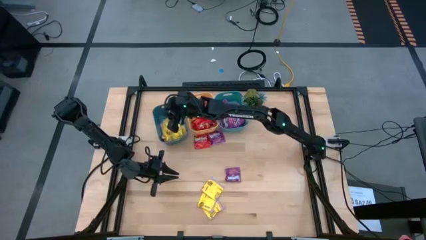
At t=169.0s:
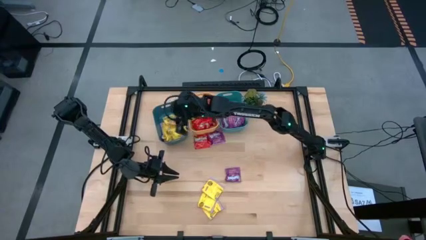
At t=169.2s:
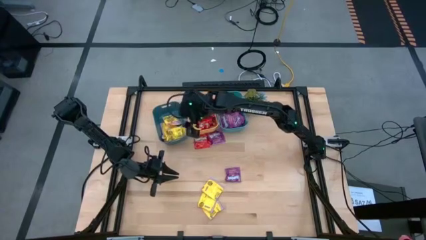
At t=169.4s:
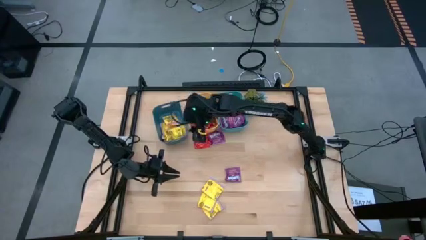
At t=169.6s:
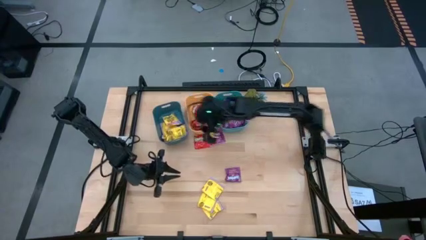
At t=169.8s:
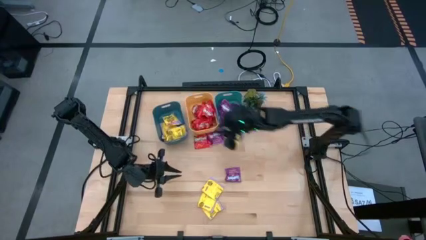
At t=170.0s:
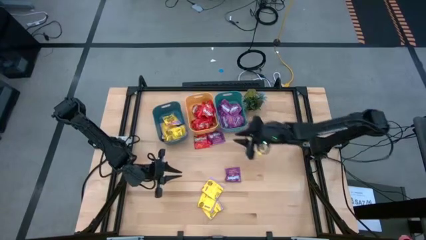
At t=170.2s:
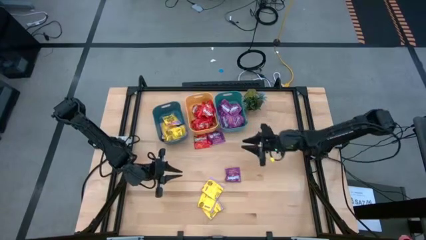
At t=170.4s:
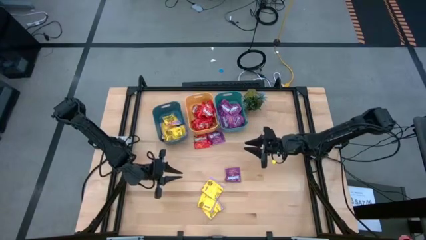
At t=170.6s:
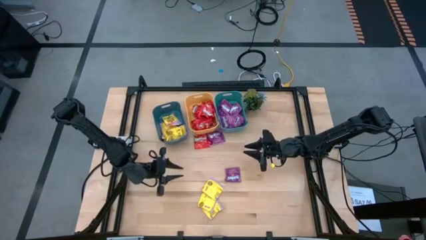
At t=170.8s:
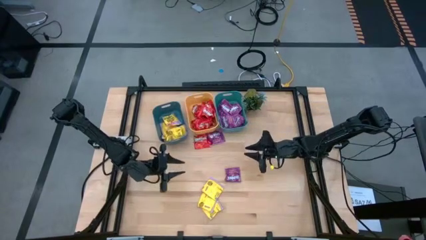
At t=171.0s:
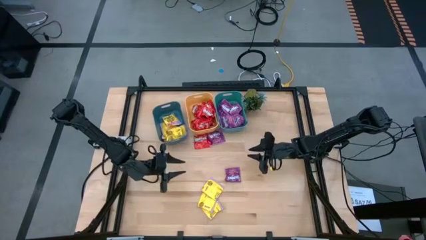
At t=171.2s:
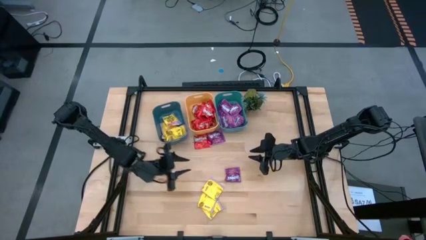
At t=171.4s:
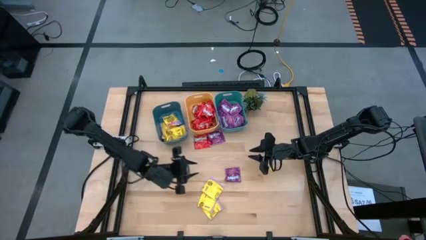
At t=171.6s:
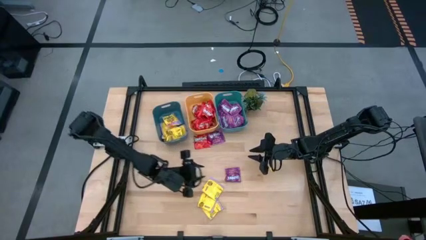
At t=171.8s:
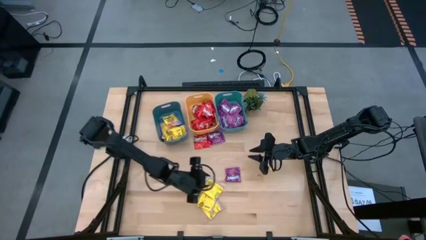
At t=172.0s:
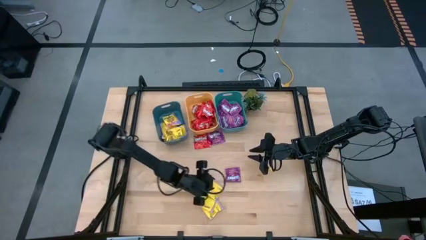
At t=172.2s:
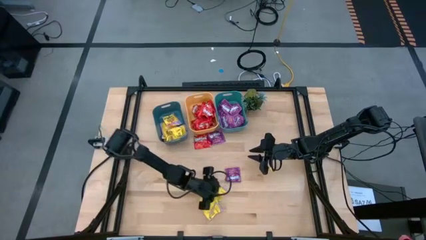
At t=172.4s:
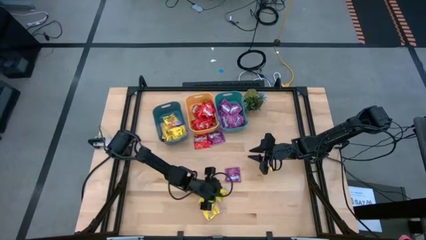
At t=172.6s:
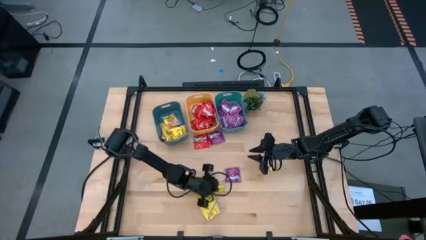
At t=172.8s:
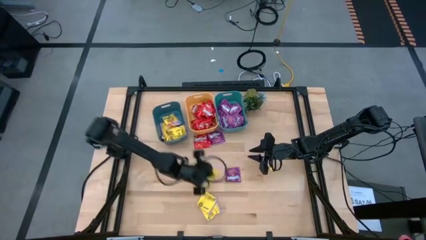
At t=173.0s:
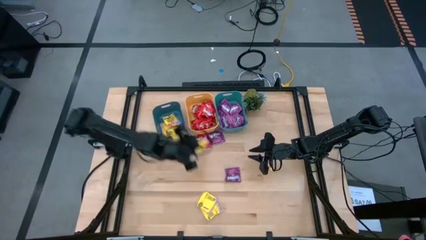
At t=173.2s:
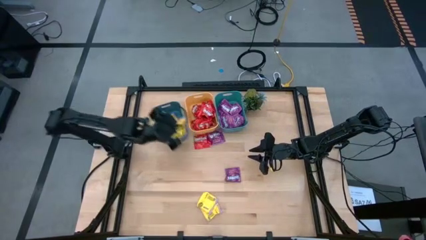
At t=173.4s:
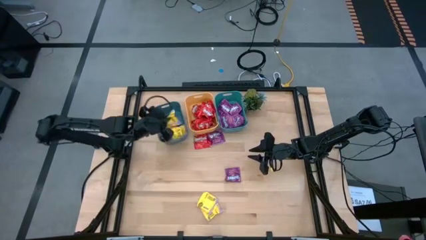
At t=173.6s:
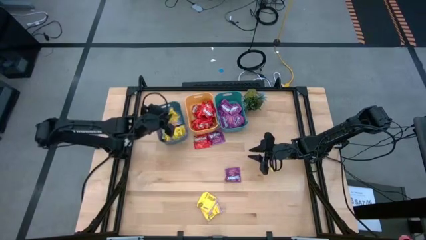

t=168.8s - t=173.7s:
Task: Sort candy
Put the yellow candy into the blue bin

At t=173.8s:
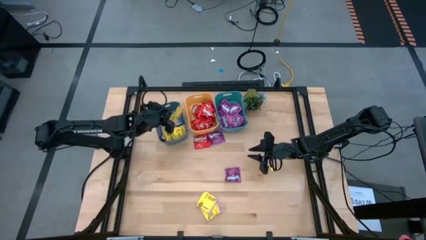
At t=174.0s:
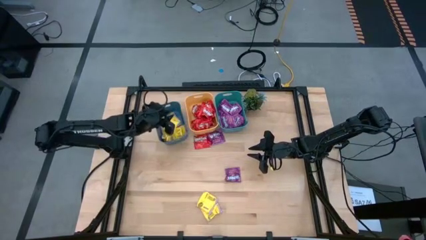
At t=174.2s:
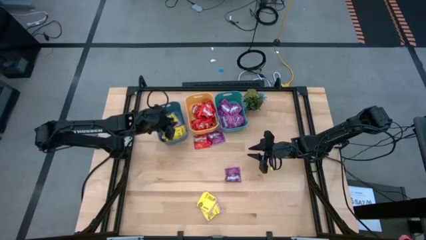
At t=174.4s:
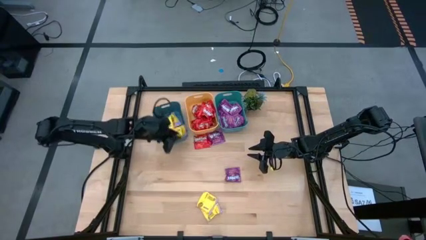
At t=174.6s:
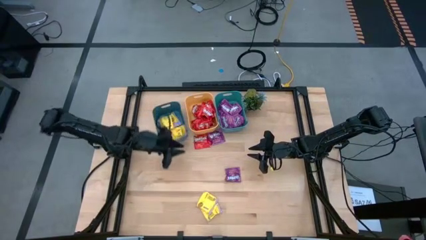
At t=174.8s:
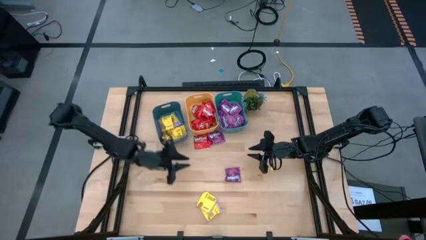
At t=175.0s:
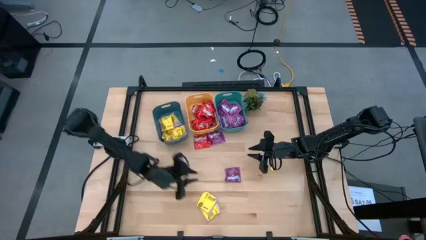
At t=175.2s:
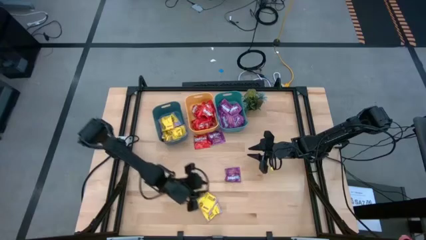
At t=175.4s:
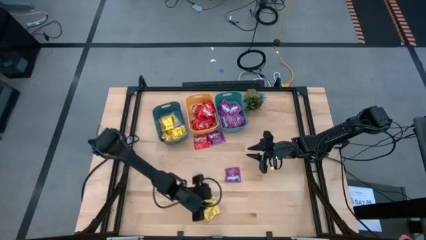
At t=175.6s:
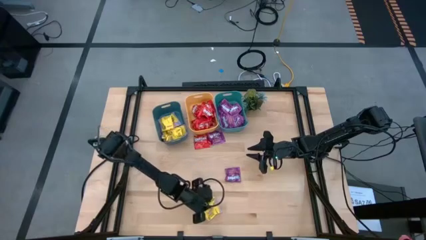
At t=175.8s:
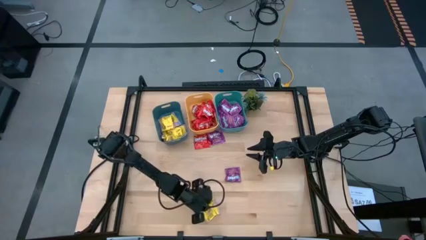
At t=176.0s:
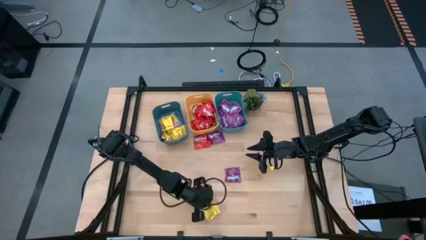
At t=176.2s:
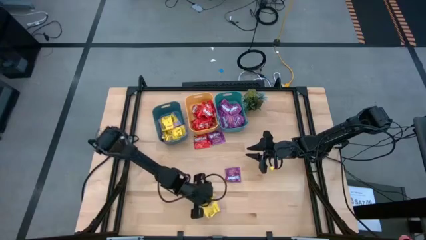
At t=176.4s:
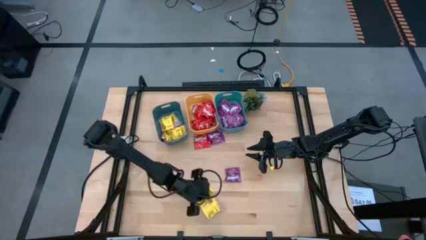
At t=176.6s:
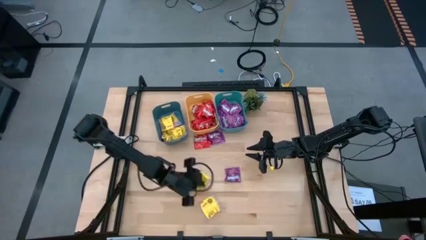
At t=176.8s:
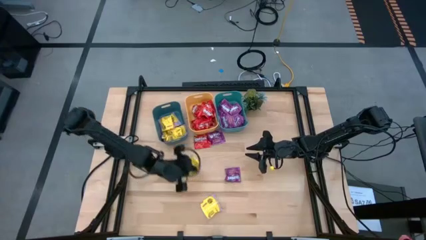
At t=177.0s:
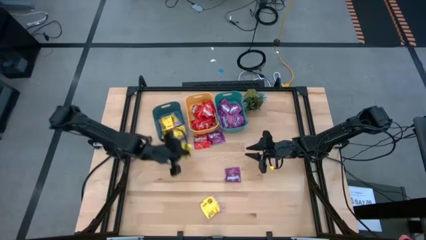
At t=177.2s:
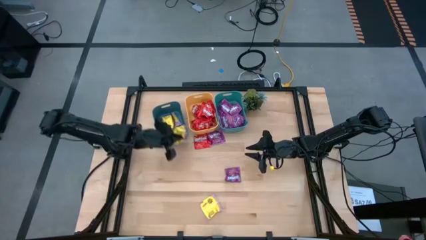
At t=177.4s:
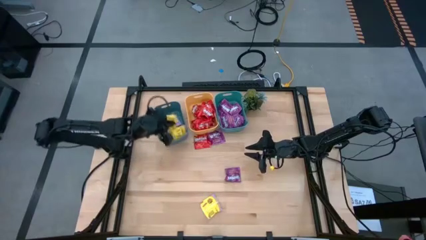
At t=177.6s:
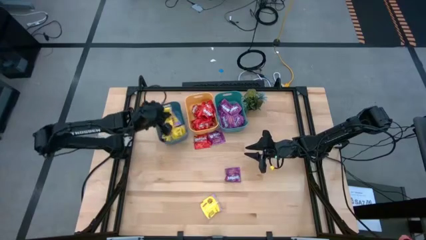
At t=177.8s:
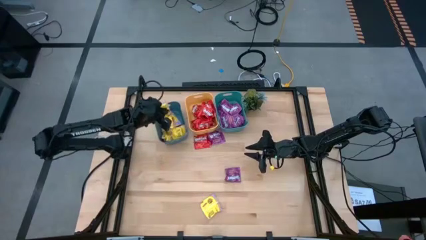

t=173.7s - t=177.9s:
Put the yellow candy into the blue bin

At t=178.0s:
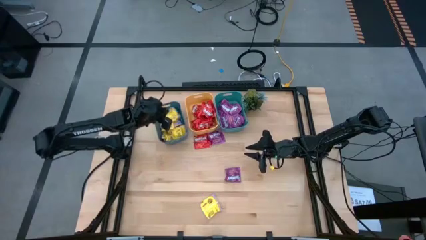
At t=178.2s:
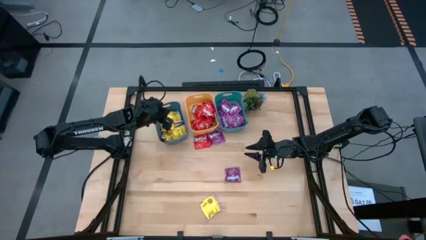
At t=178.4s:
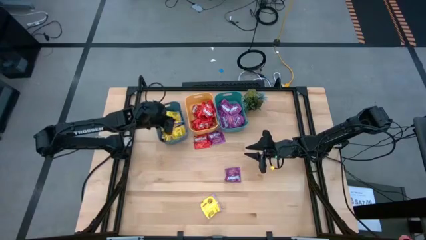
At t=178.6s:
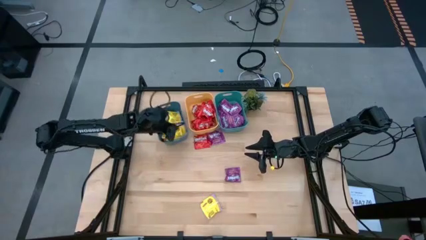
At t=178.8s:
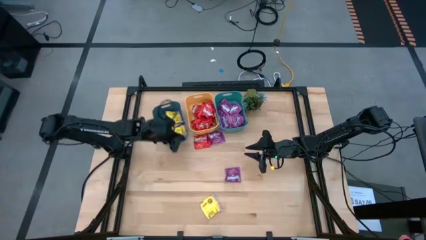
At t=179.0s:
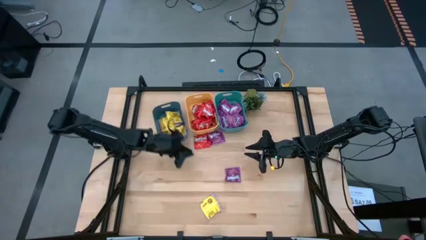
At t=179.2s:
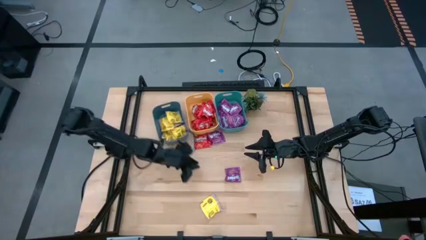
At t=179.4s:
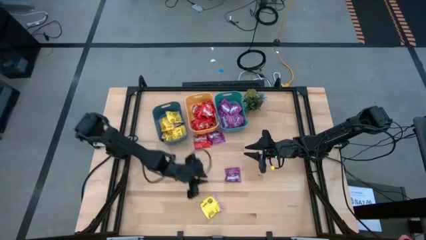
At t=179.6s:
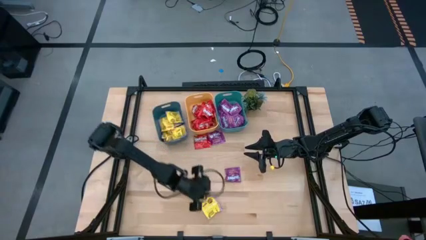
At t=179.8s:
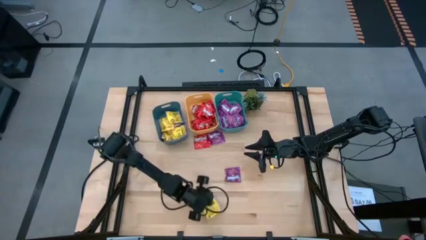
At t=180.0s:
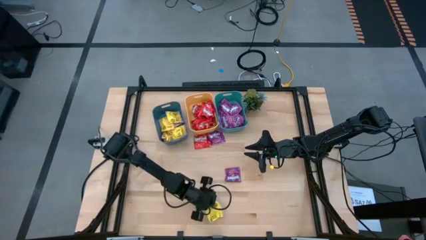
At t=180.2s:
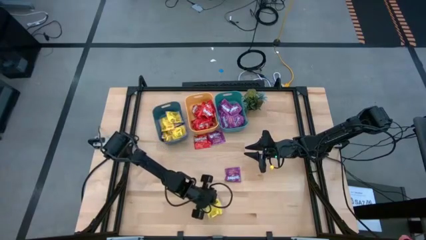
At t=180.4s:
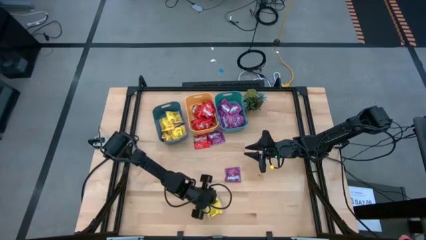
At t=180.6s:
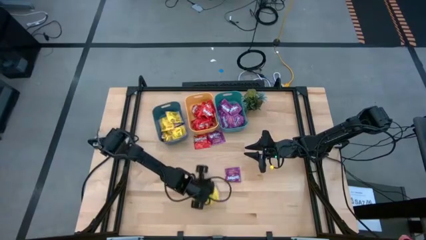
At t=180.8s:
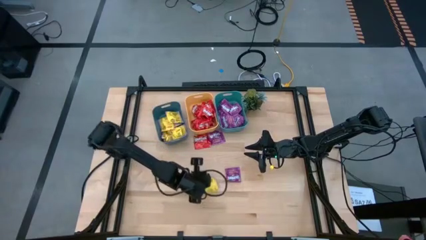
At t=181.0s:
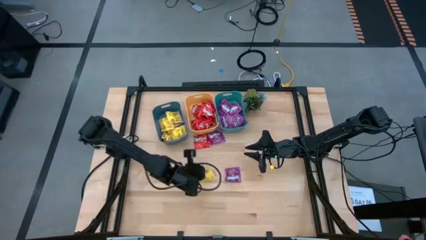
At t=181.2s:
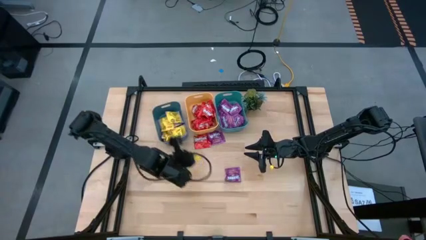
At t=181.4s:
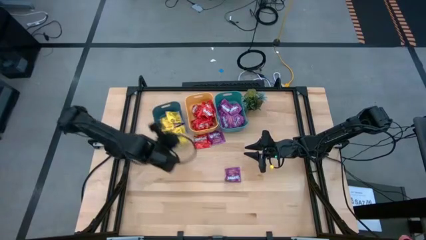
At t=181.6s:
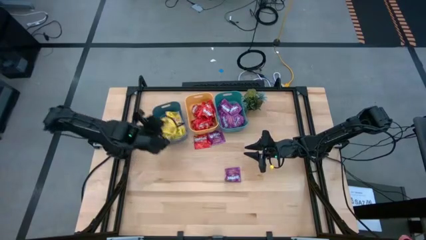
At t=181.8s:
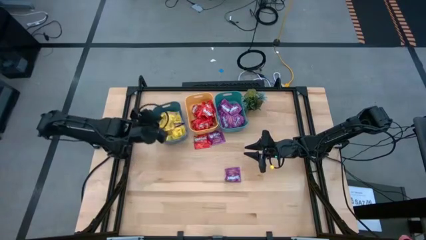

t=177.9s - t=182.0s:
Put the yellow candy into the blue bin

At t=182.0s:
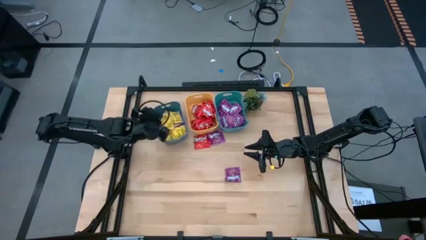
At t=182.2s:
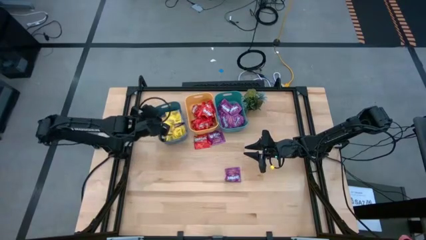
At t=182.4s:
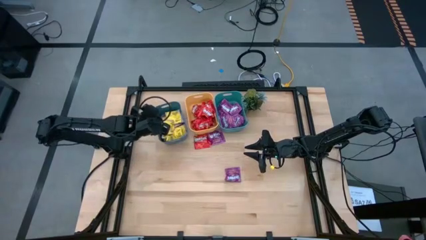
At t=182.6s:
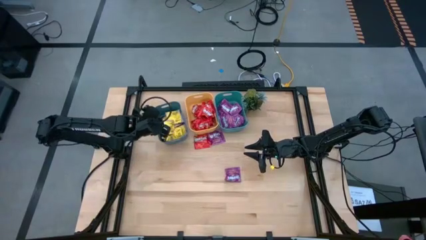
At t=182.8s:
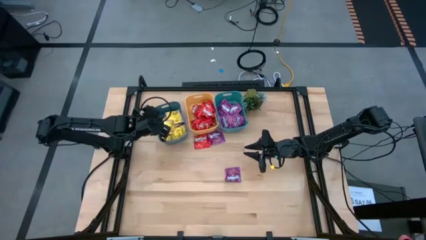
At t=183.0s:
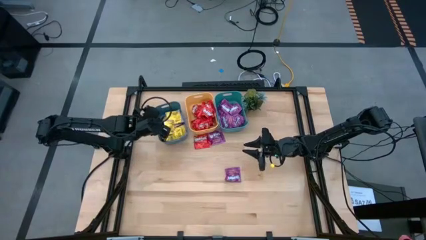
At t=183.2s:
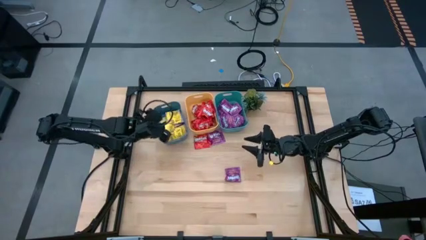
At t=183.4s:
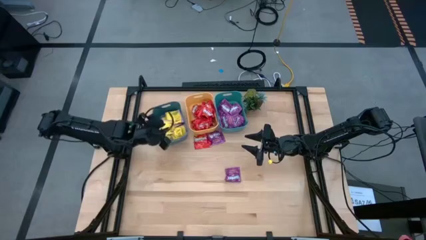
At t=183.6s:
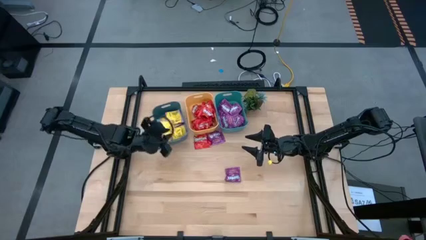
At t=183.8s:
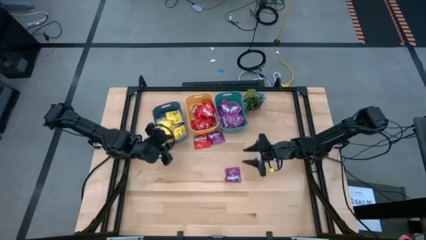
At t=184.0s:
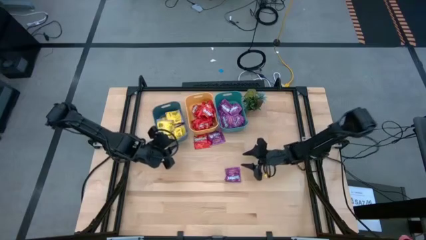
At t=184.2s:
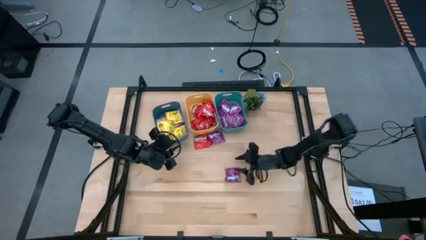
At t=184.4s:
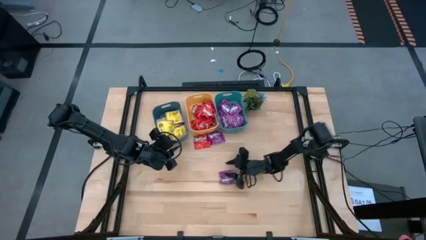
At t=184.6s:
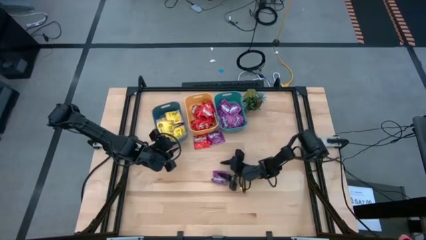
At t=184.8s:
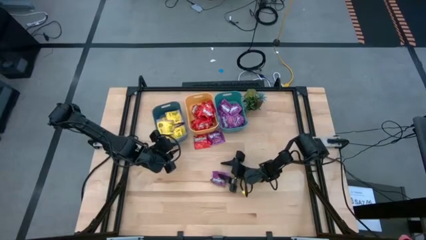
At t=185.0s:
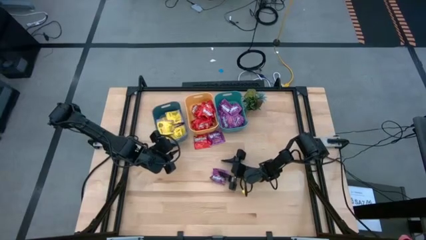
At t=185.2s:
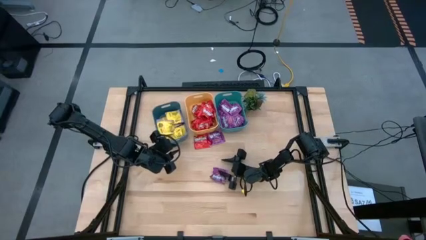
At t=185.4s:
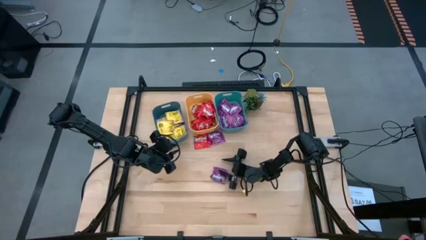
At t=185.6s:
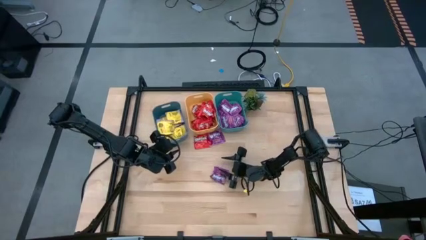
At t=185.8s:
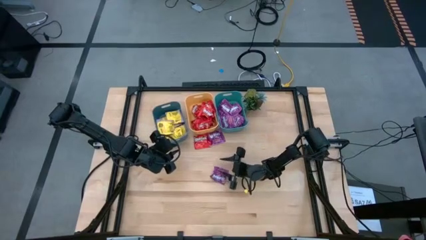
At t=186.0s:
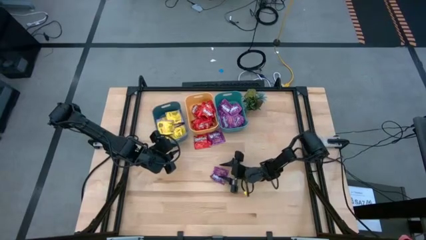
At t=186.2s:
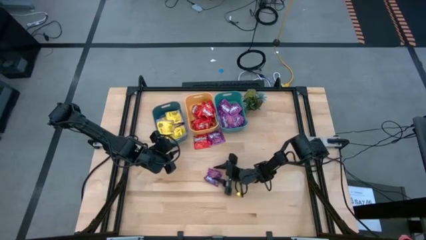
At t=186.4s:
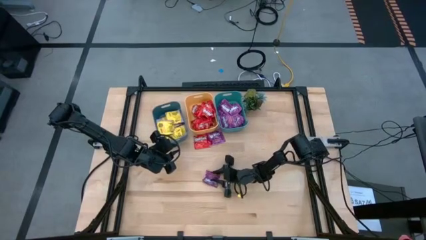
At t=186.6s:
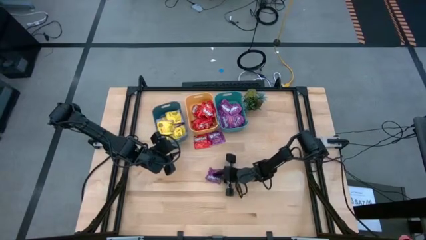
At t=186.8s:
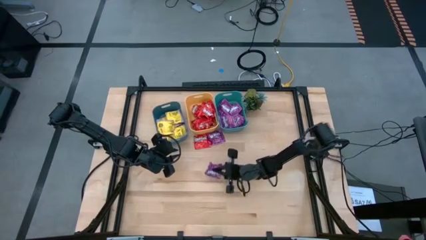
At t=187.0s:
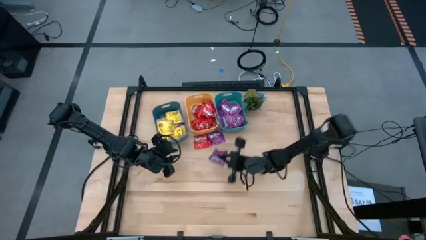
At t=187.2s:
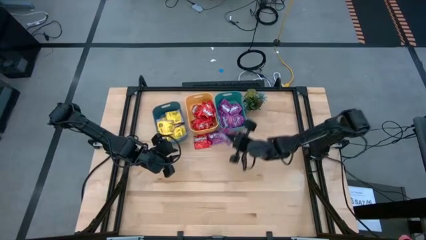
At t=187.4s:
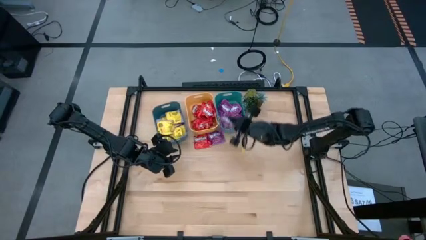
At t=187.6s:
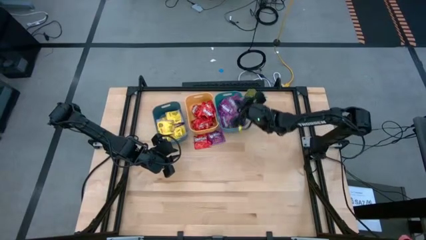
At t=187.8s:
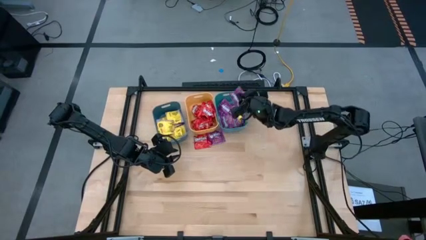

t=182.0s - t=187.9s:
Put the purple candy into the green bin
